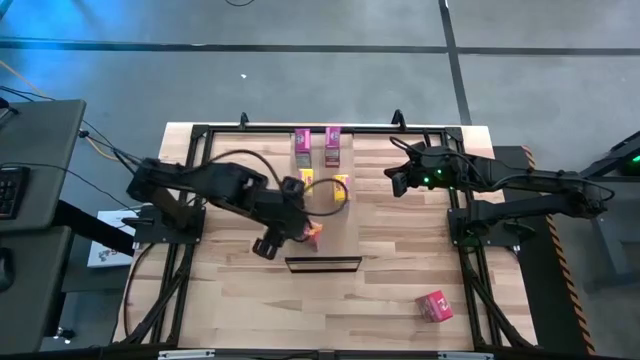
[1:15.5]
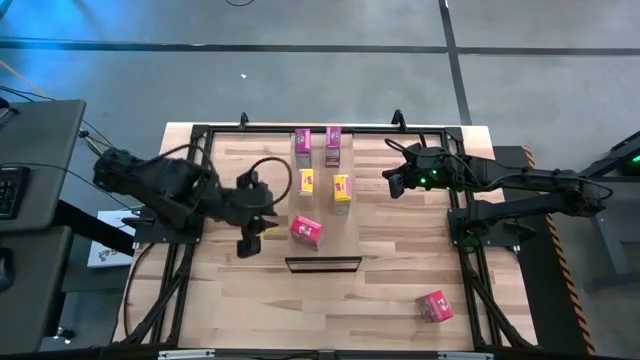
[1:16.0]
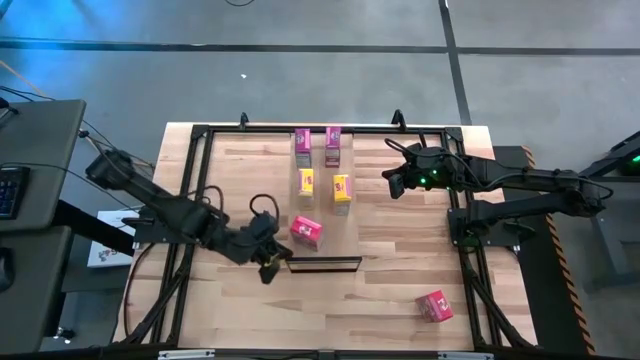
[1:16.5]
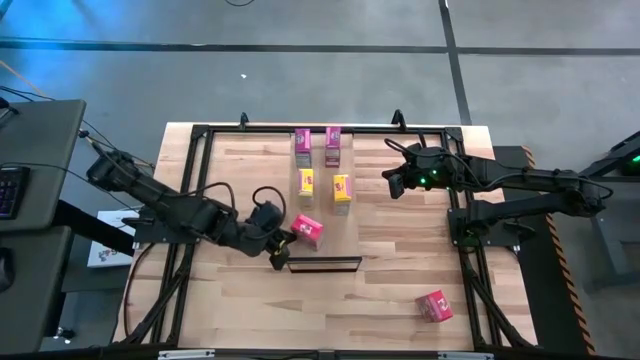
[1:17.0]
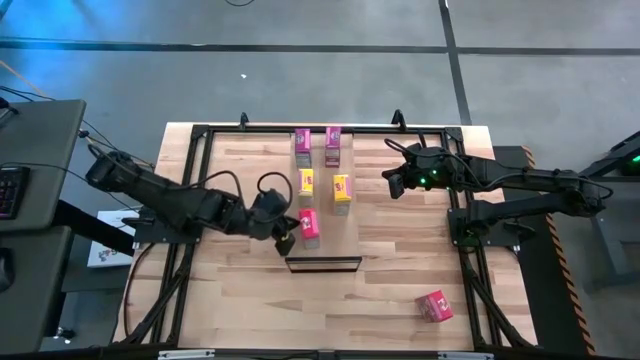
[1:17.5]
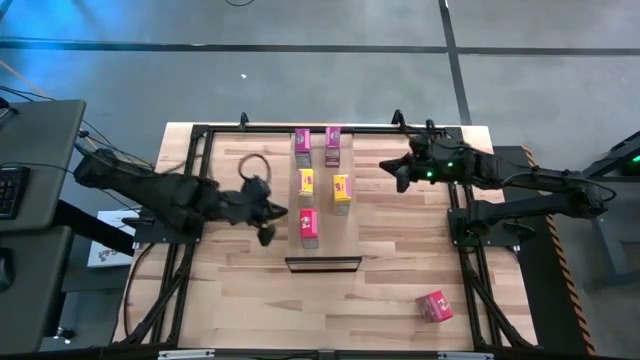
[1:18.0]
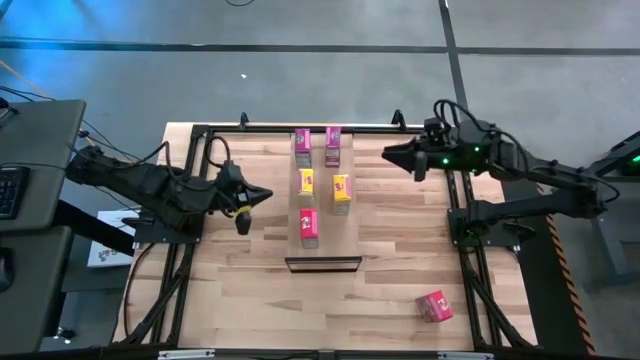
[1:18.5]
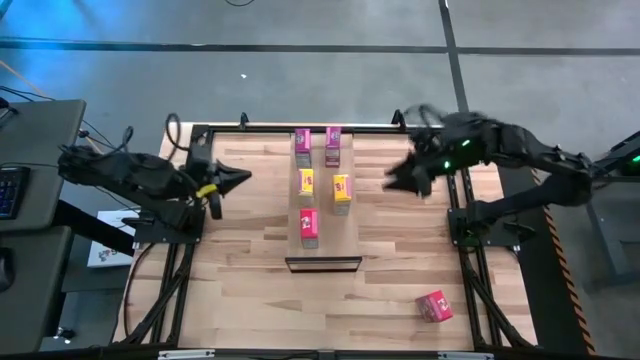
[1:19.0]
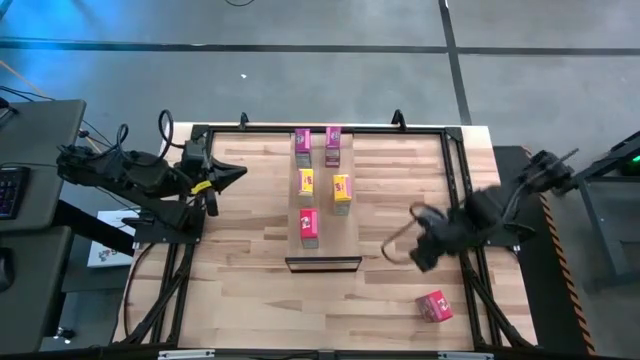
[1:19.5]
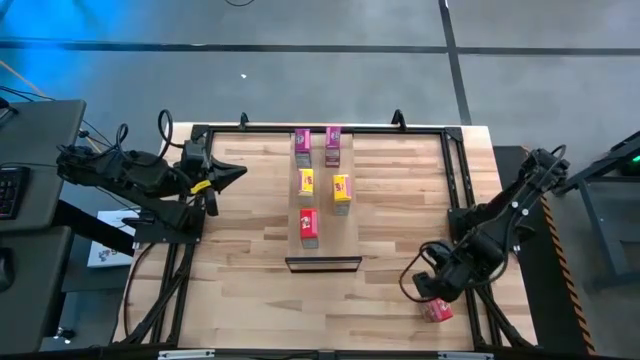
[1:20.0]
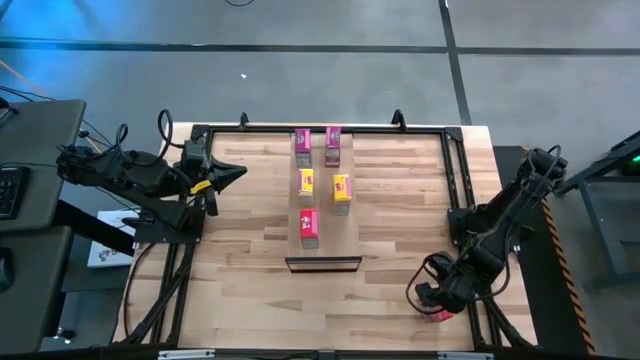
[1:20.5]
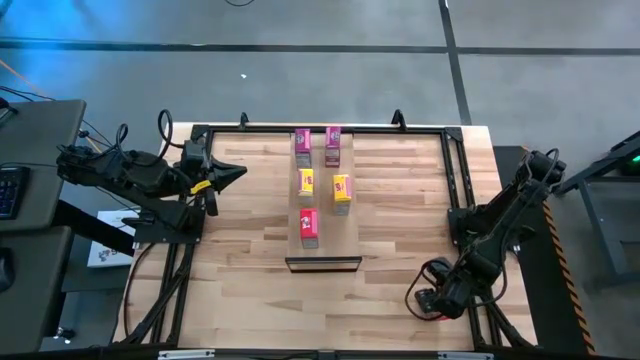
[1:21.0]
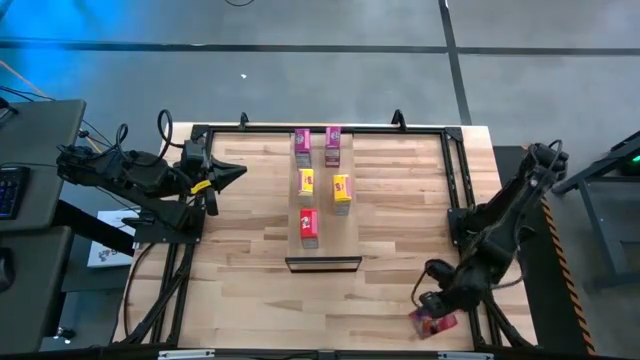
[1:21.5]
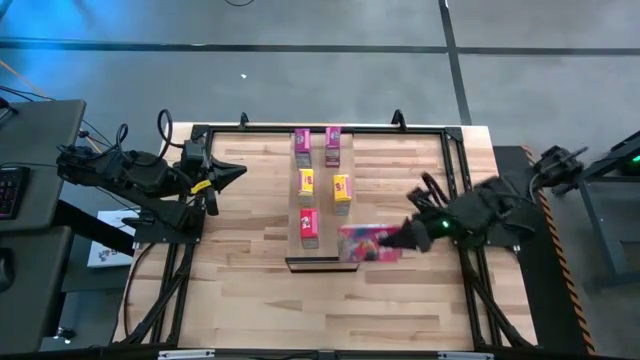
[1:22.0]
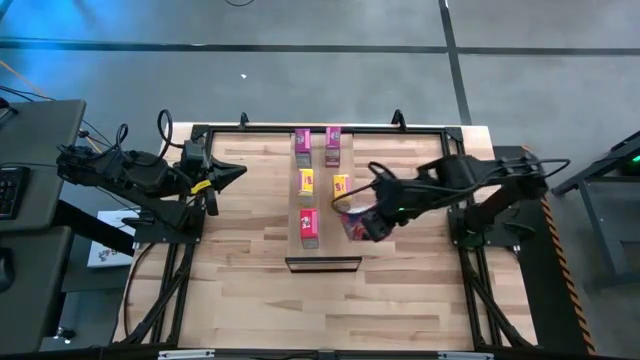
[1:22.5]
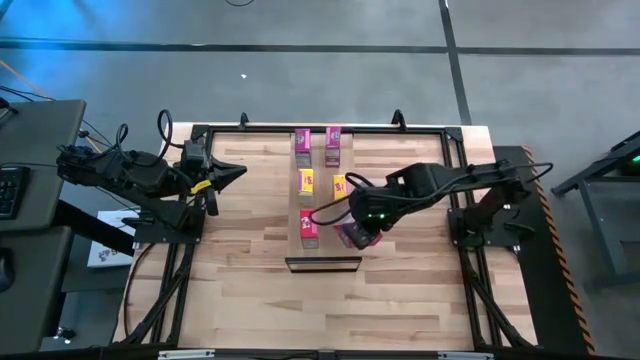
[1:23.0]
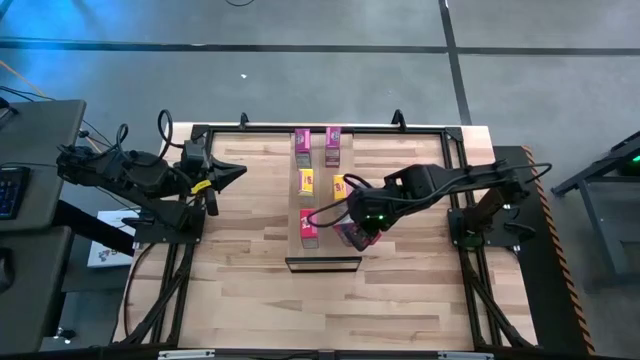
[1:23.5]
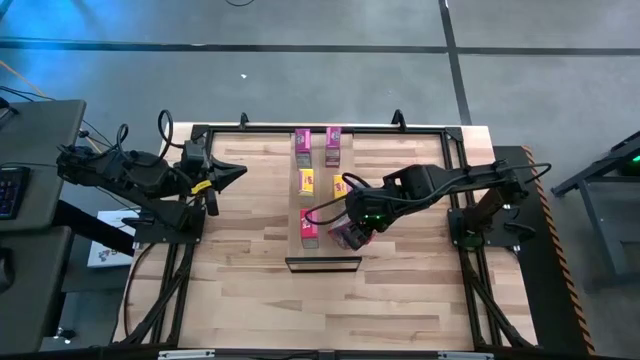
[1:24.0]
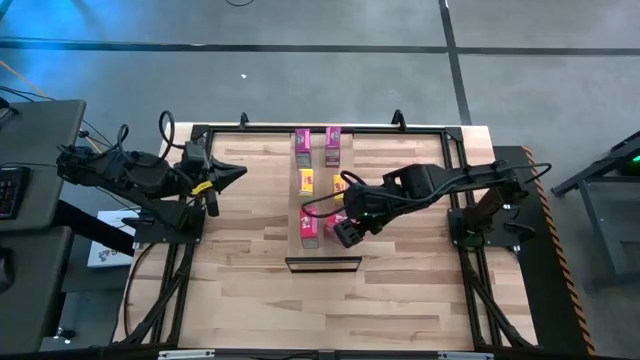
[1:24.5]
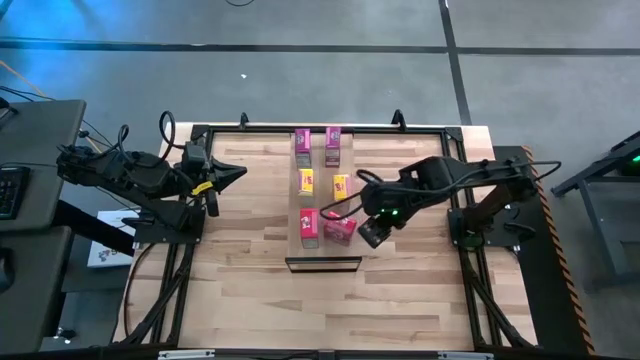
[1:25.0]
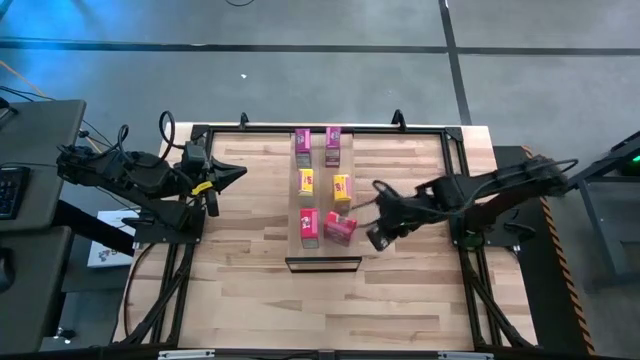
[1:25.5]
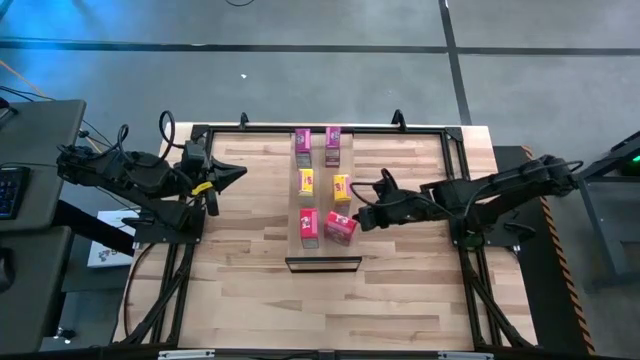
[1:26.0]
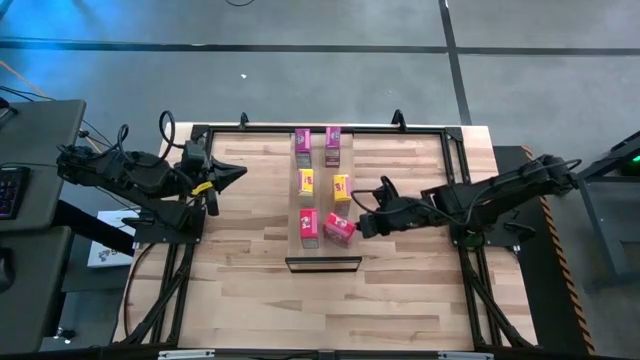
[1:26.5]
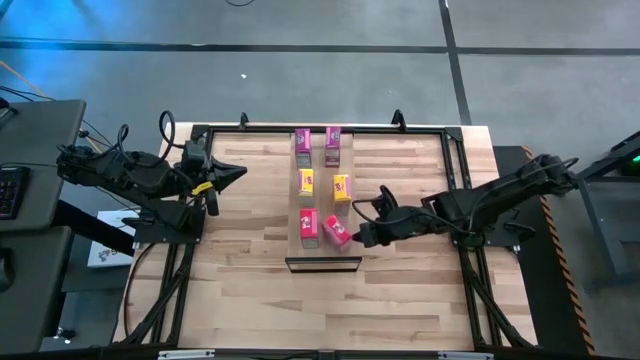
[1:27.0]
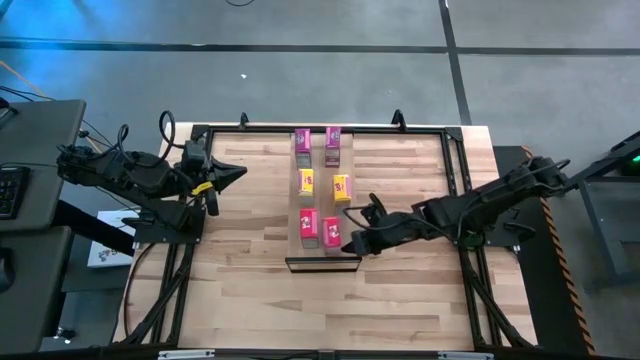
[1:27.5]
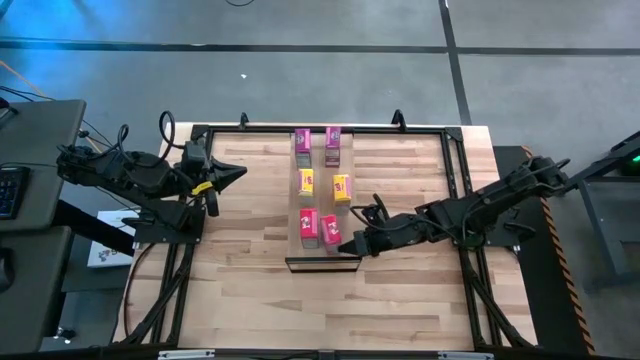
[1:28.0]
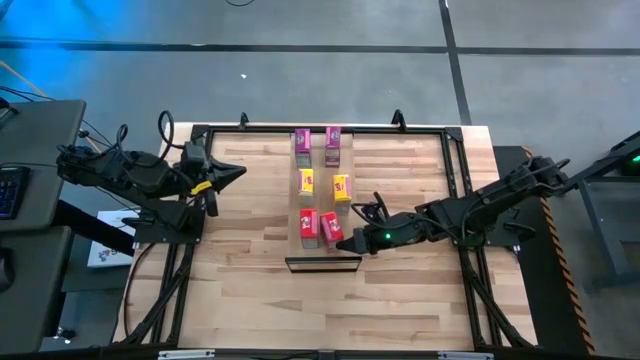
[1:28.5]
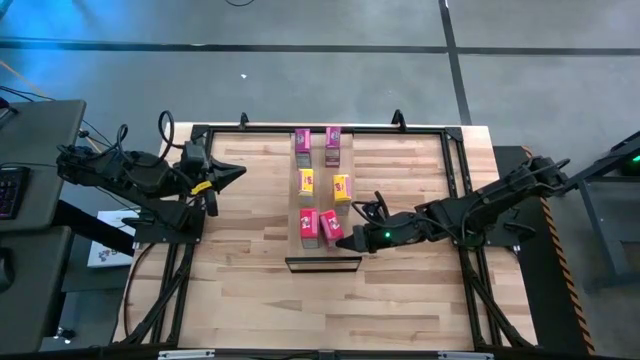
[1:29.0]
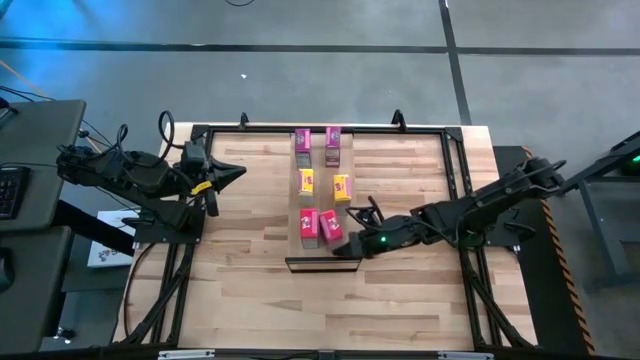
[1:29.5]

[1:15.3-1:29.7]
Task: Stack cereal on shelf
Put the red cereal box on the shelf aligned with the other red cereal box

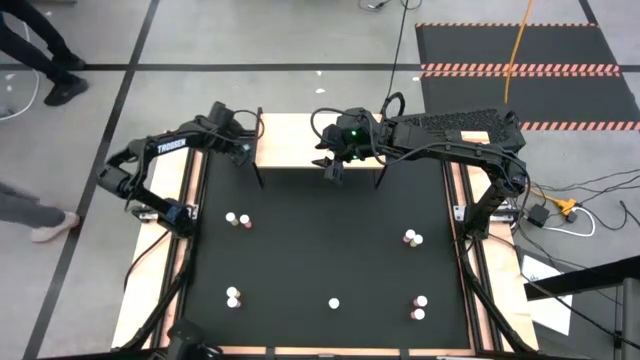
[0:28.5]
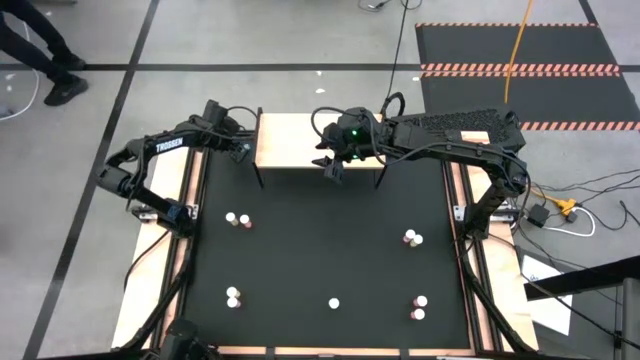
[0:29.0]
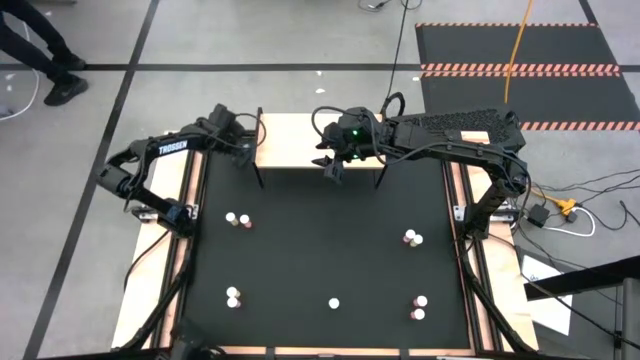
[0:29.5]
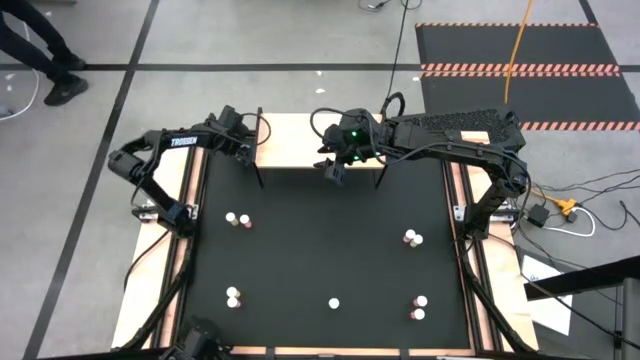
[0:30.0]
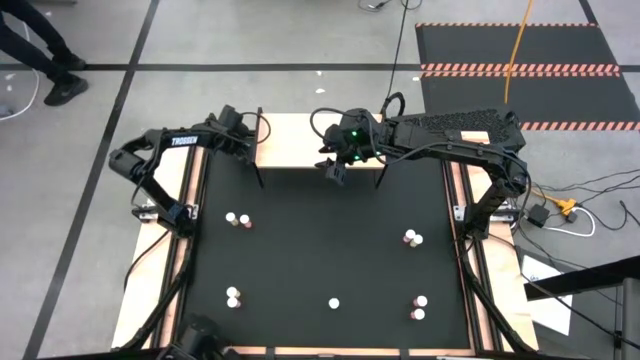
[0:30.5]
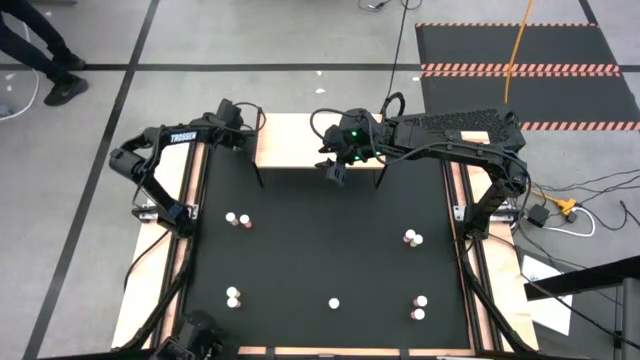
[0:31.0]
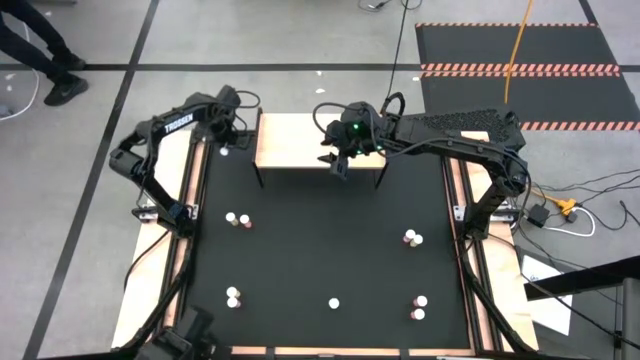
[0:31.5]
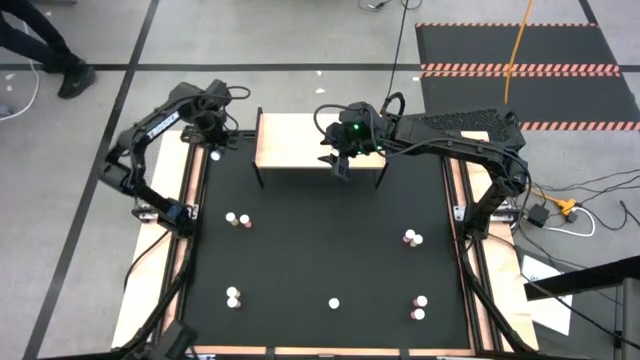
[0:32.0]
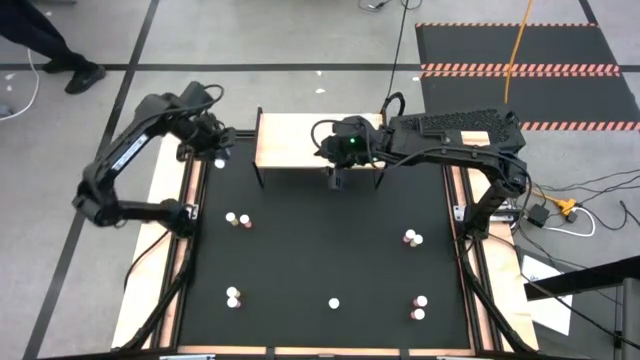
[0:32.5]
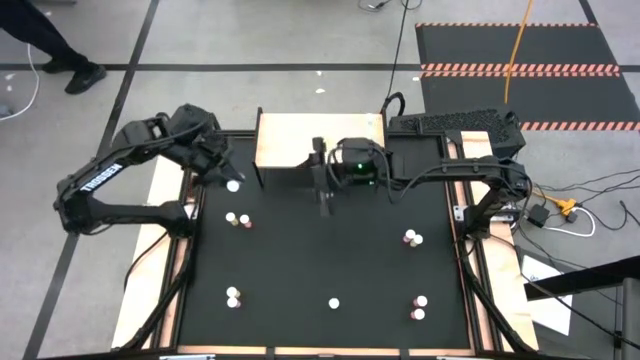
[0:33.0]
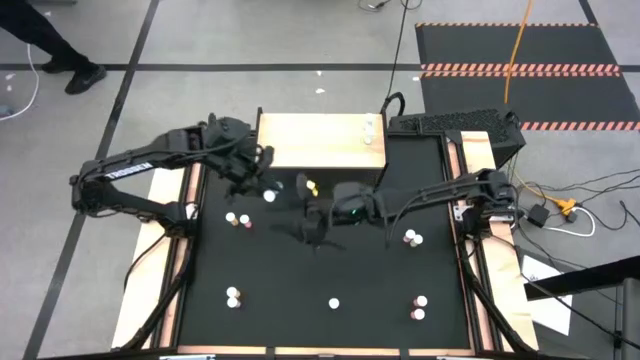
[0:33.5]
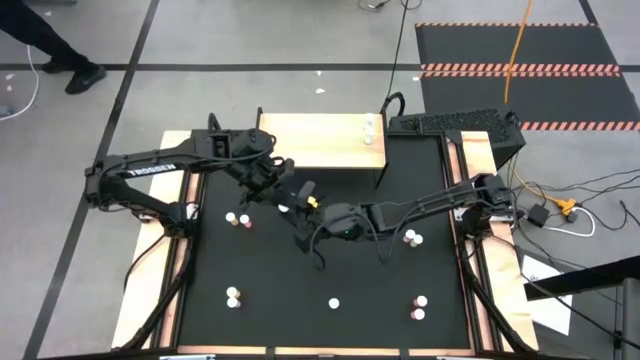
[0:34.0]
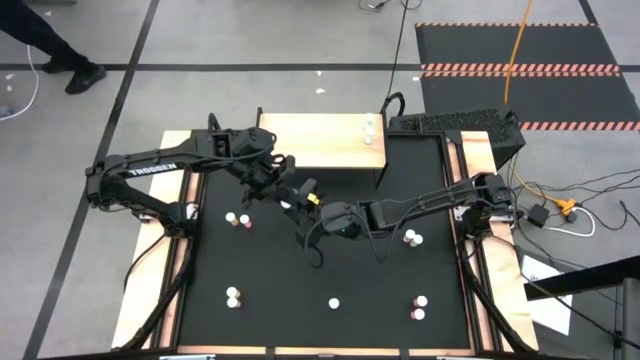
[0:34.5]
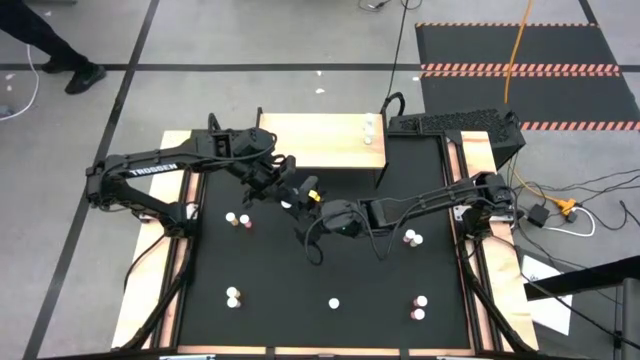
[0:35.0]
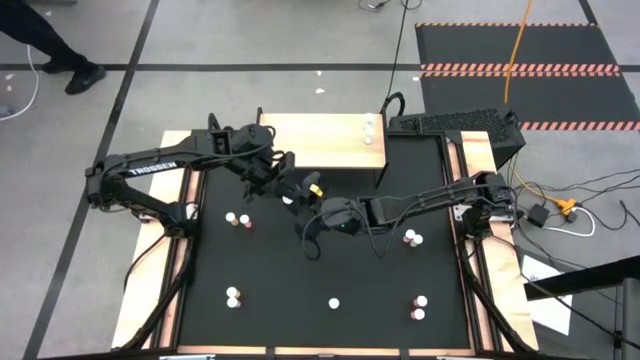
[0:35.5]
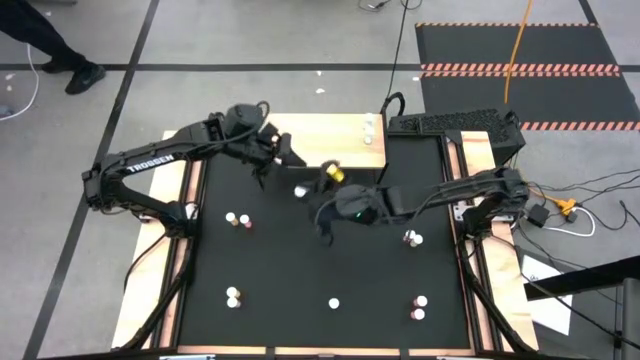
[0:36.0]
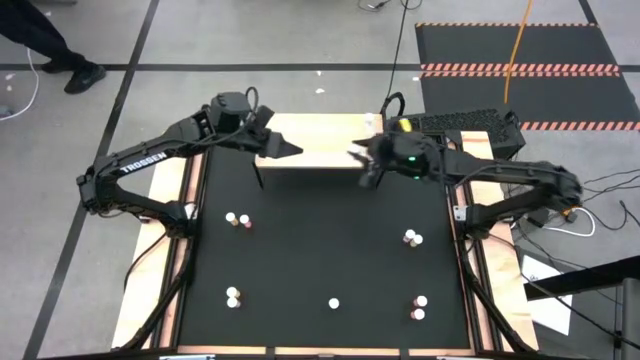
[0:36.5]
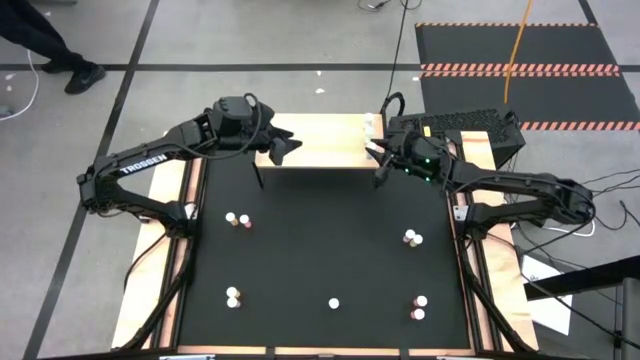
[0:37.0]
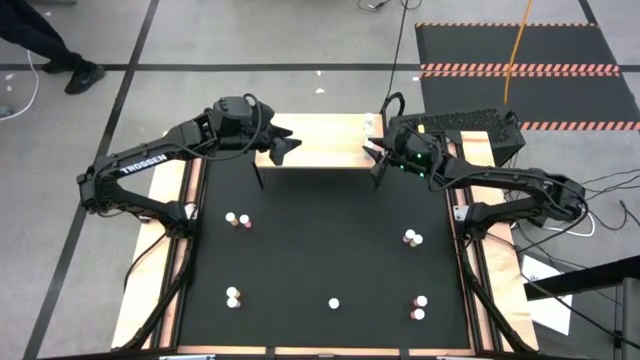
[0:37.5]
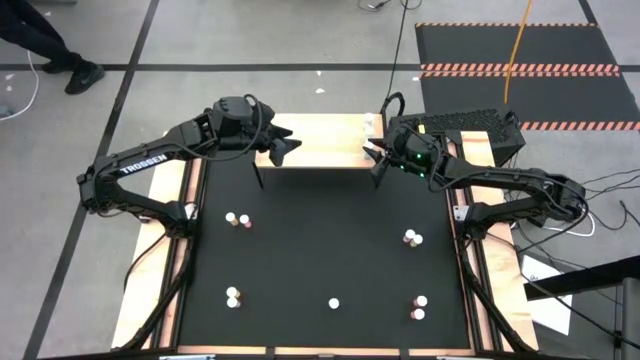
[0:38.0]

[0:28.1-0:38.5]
Task: Pick and place medicine bottles onto shelf by color
Put the blue pill bottle on the shelf aligned with the other blue pill bottles
